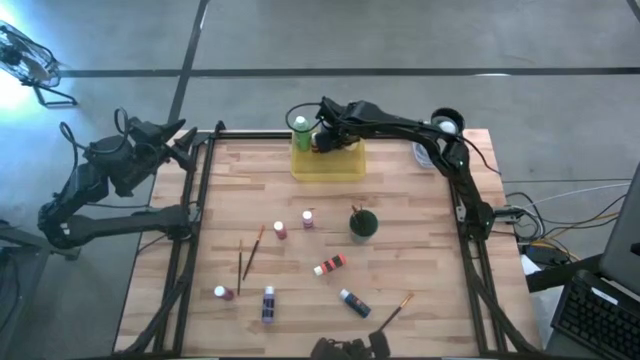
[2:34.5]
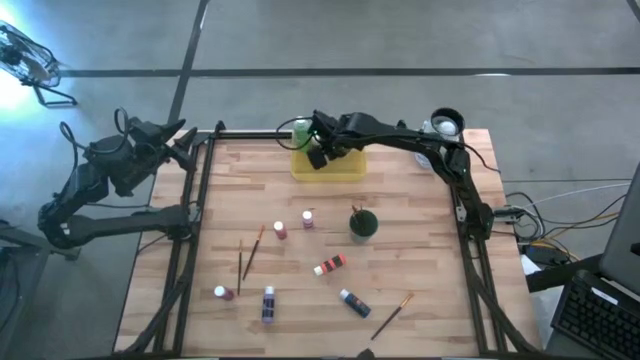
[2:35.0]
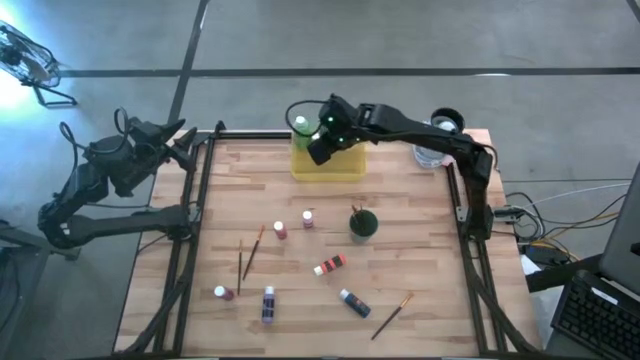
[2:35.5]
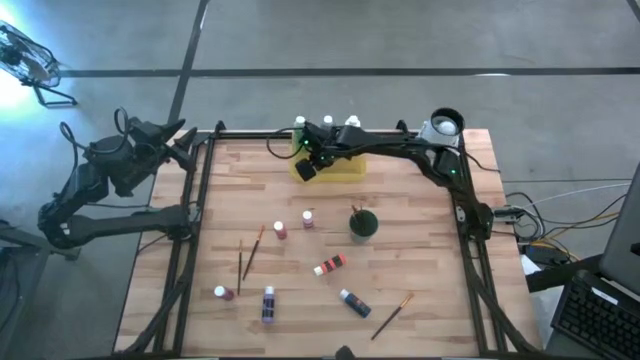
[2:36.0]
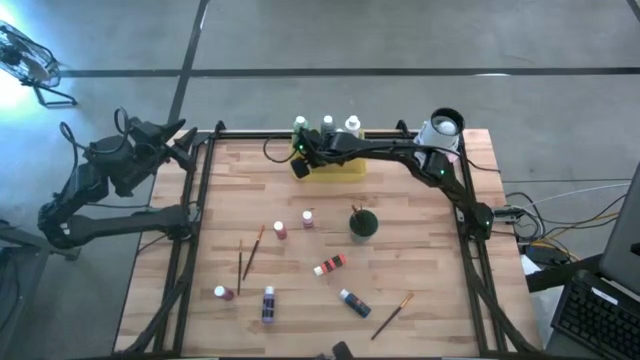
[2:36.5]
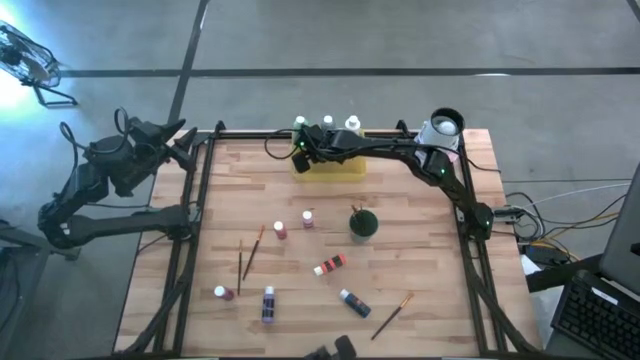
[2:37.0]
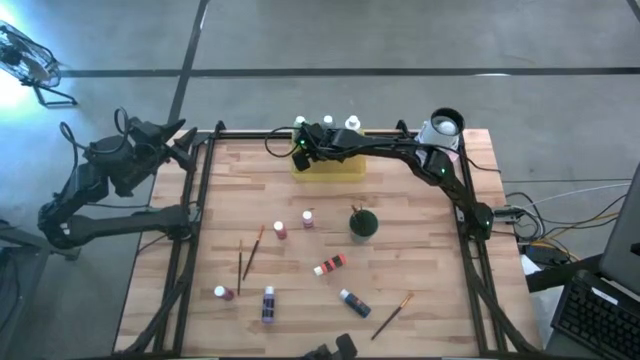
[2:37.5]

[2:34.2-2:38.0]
Task: Pick & Place Paint Supplies
Adjust the yellow paint bottle on the yellow bin

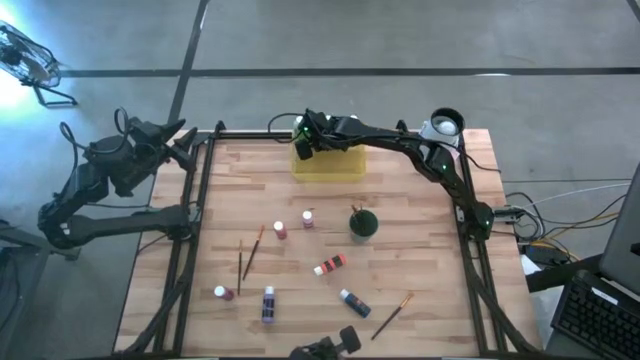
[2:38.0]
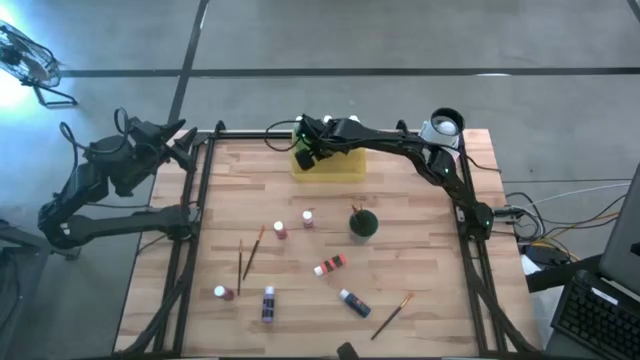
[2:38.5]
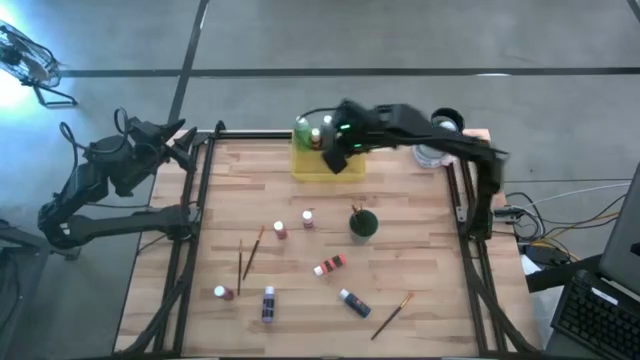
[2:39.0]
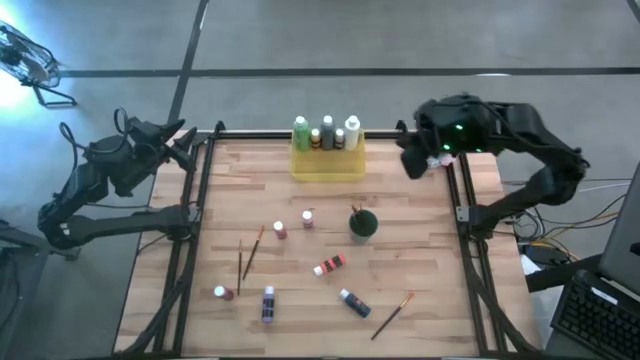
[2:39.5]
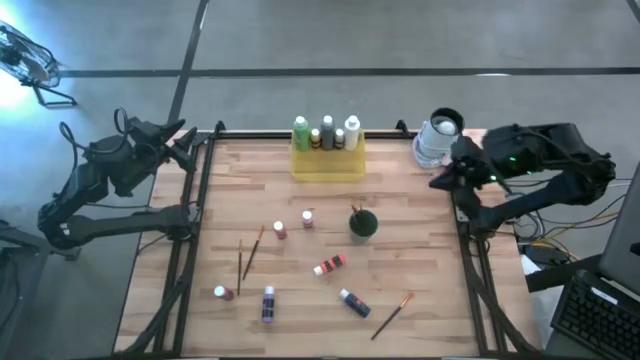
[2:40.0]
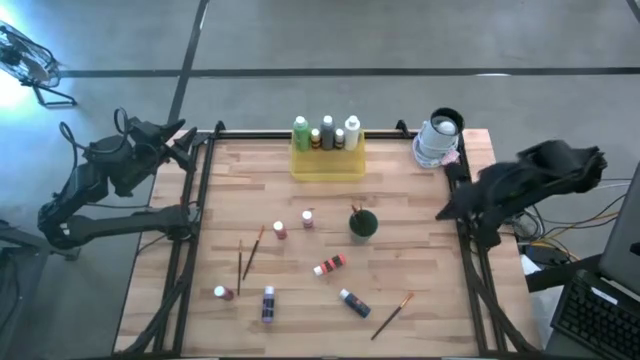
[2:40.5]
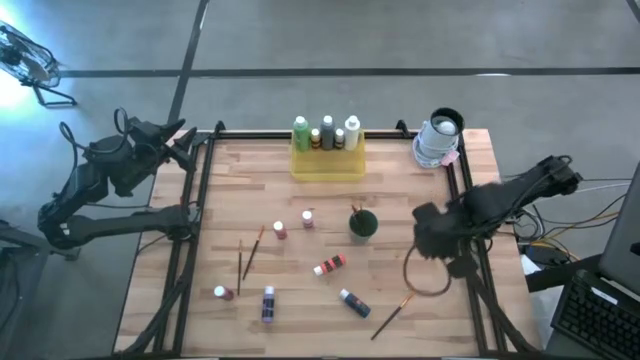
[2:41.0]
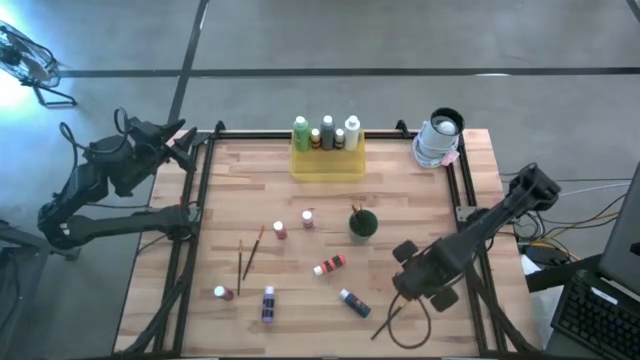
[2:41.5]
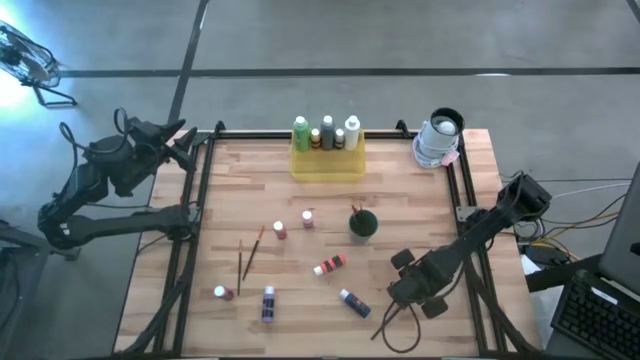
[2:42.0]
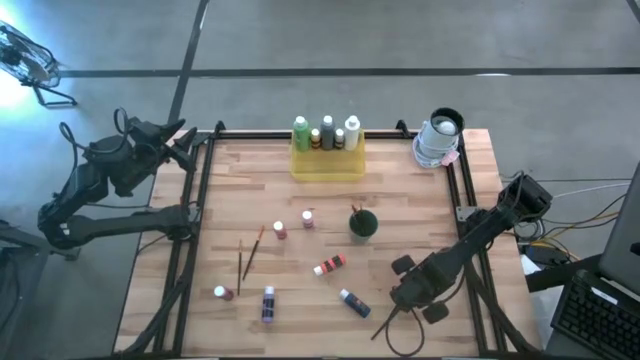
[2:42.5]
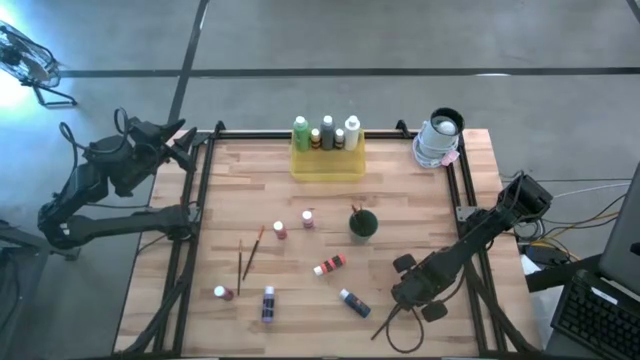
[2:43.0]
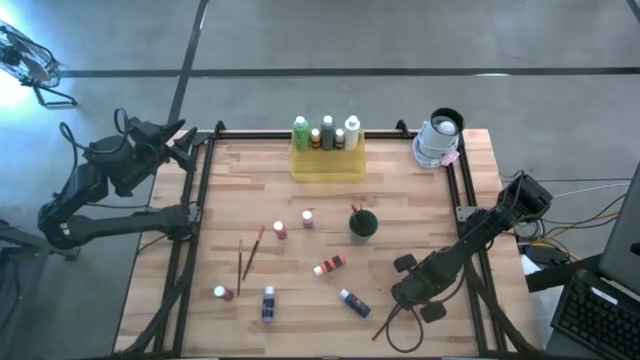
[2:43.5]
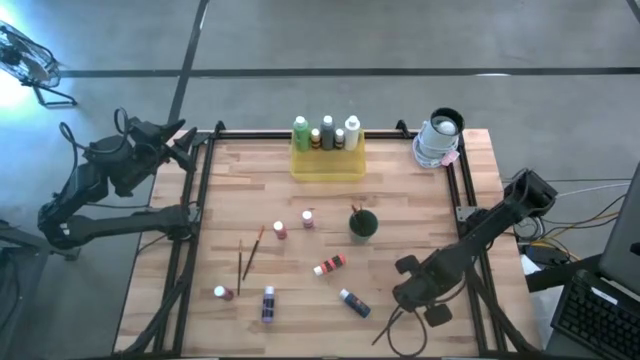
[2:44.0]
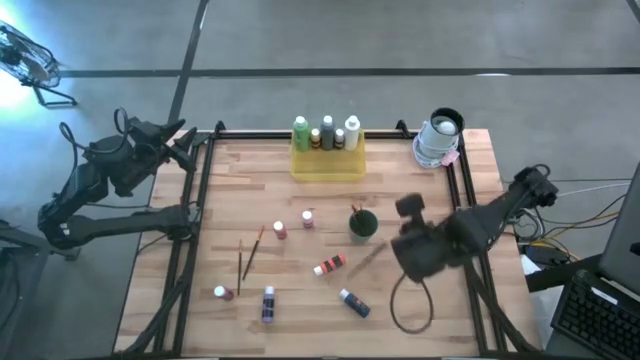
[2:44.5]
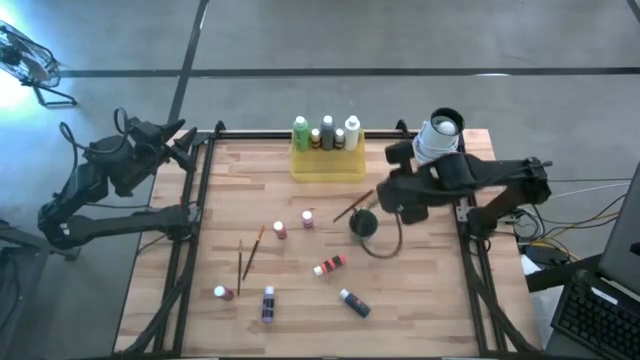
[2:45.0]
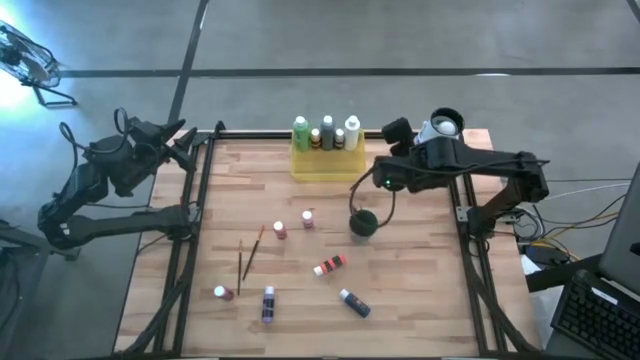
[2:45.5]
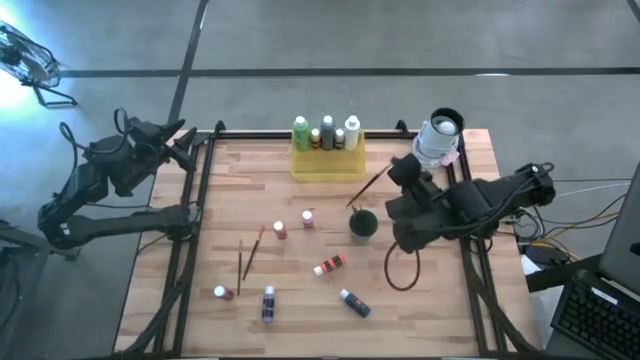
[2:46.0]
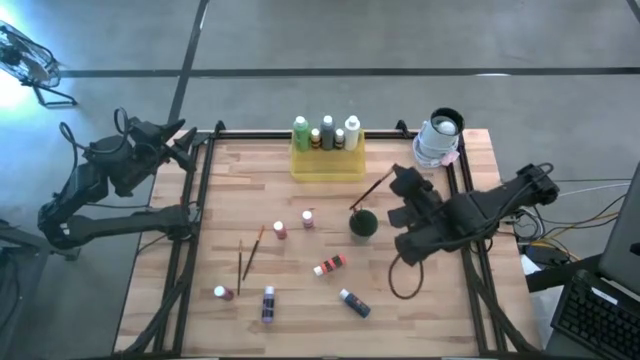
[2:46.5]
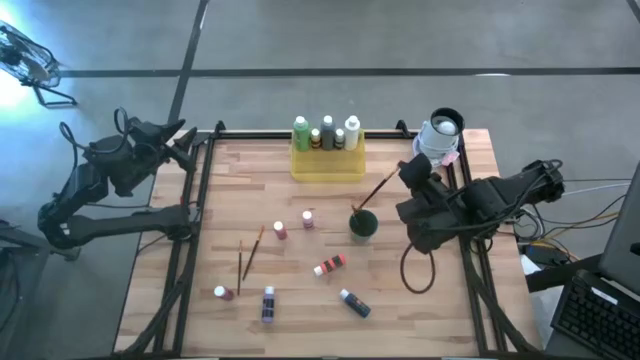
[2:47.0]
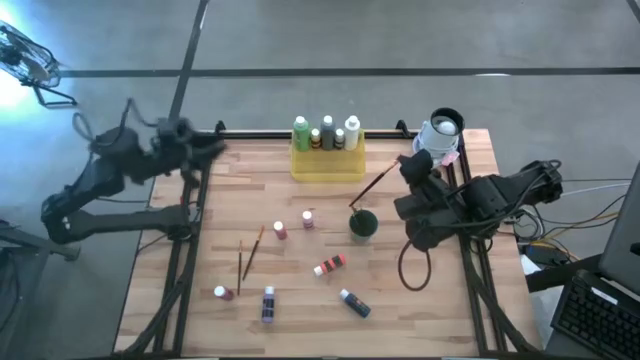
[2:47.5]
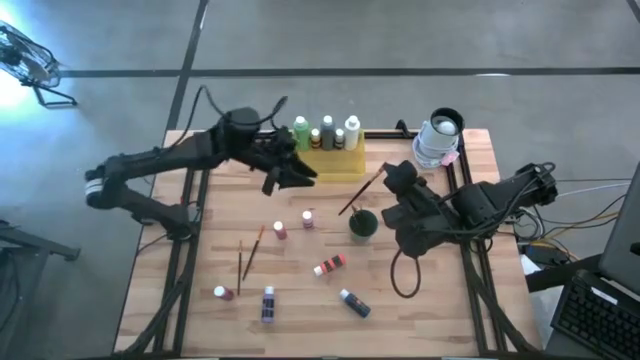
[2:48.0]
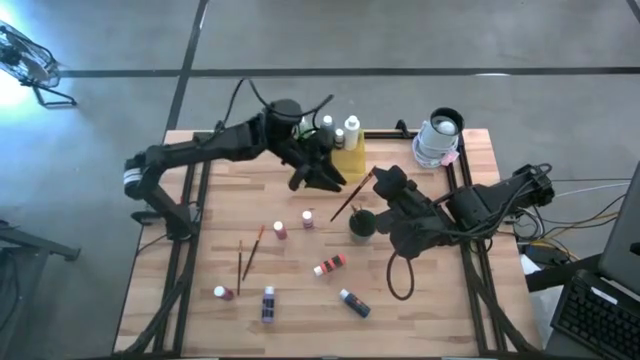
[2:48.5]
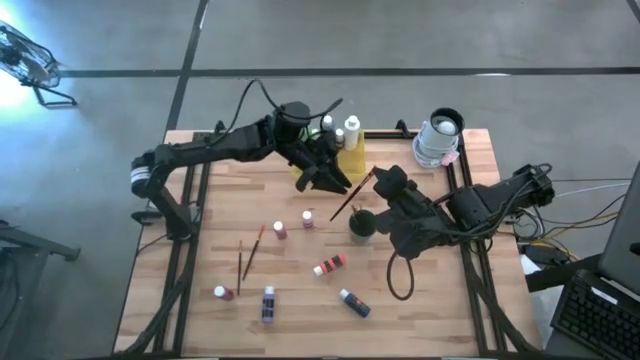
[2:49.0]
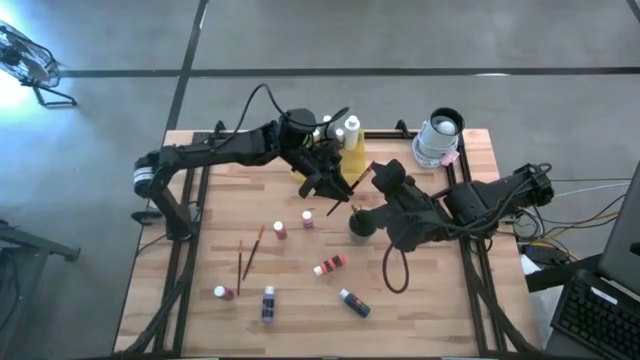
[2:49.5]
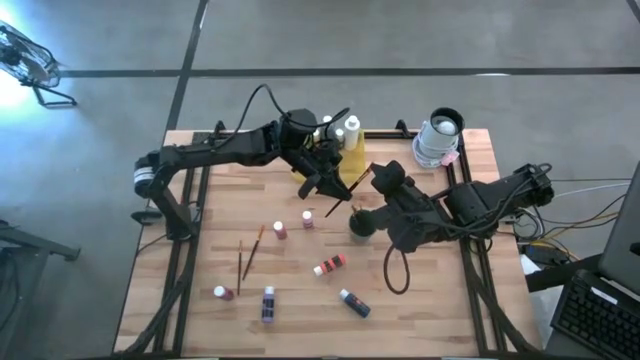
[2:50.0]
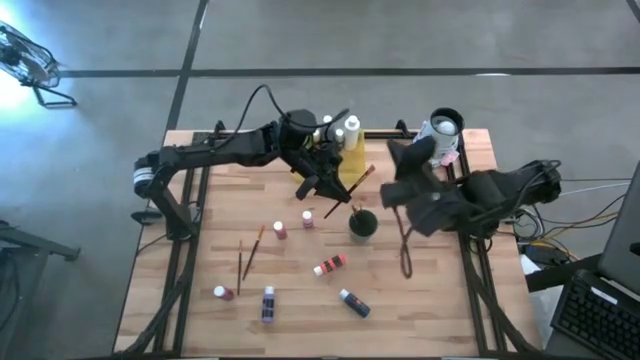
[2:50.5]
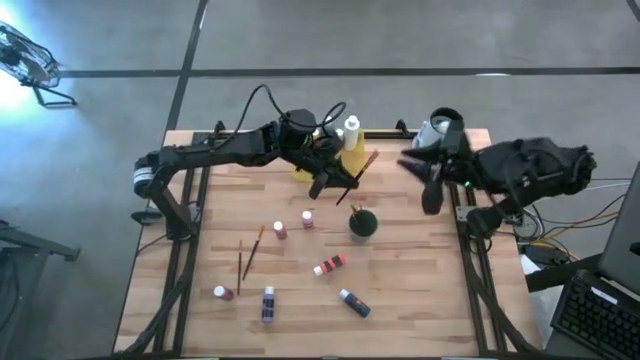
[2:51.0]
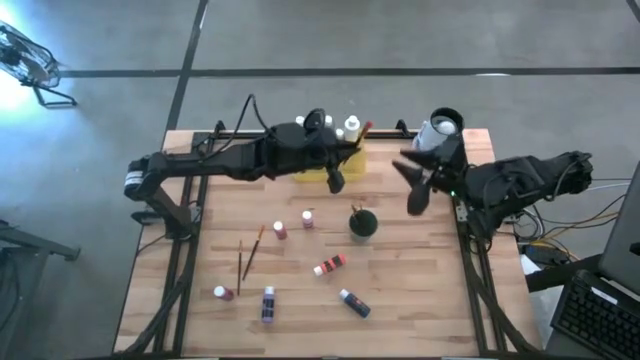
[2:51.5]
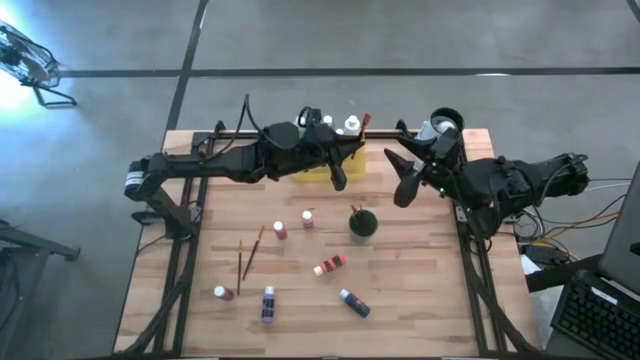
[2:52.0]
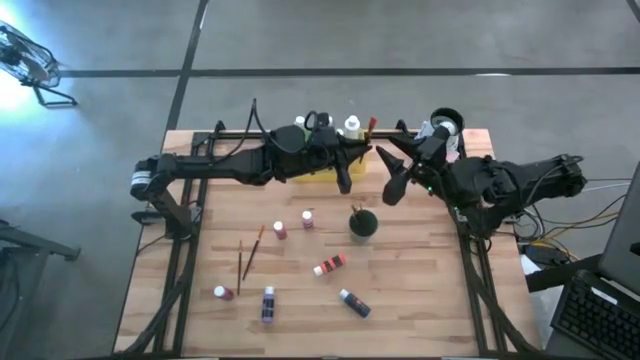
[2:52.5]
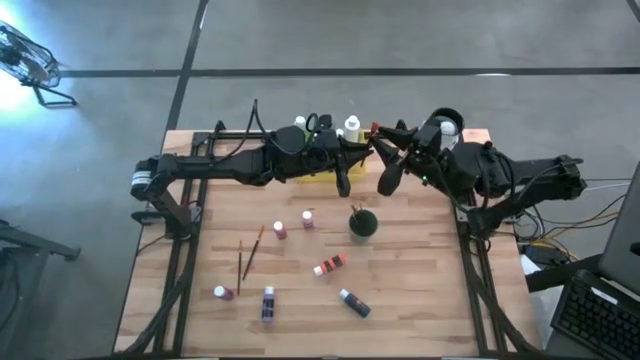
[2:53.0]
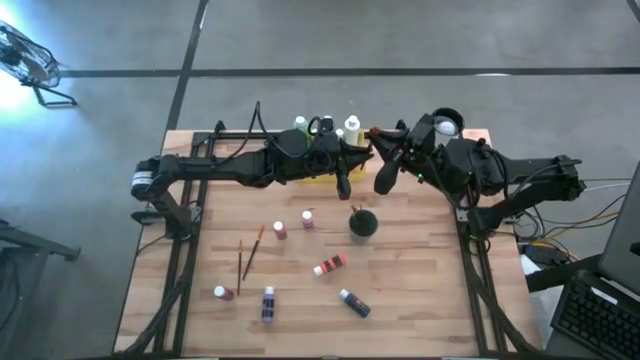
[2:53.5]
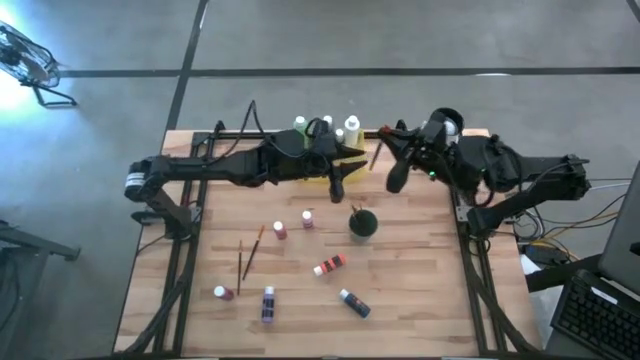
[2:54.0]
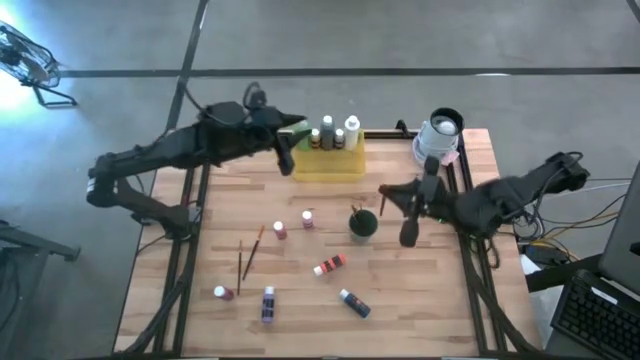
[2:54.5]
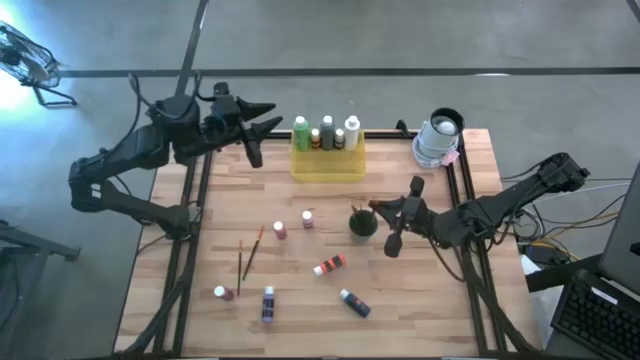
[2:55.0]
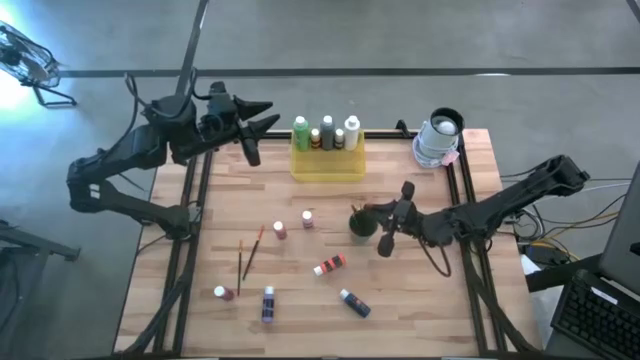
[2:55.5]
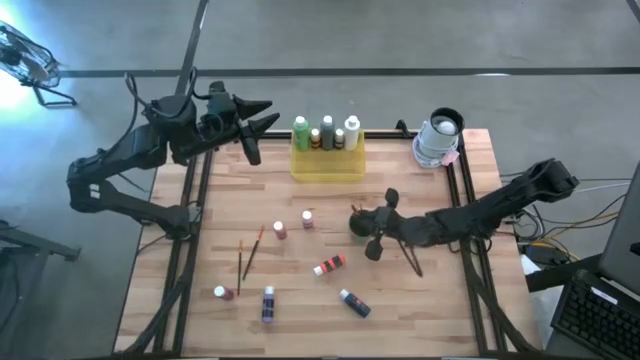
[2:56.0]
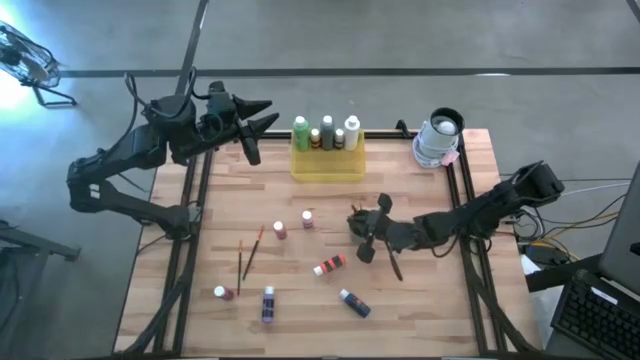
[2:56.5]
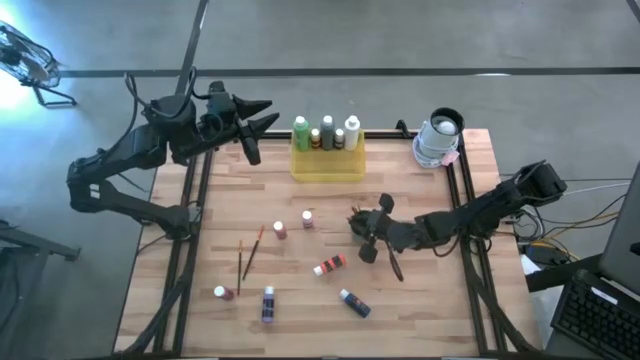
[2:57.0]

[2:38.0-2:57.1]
Put the gold paint brush into the green cup
